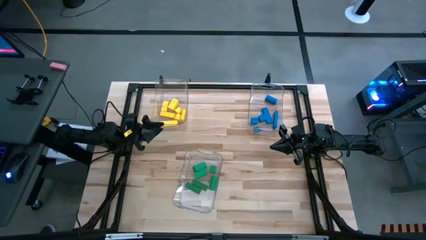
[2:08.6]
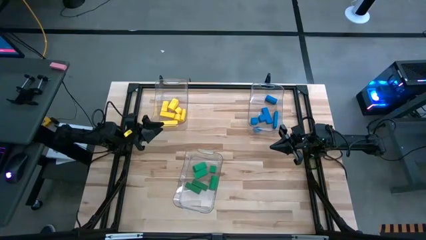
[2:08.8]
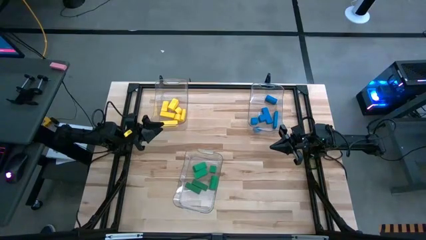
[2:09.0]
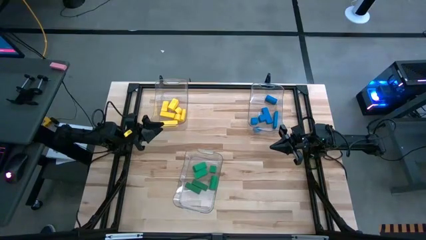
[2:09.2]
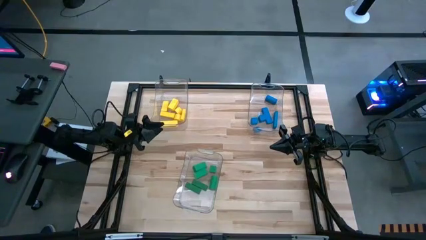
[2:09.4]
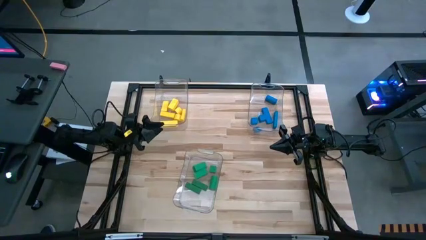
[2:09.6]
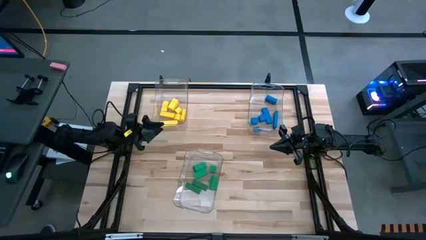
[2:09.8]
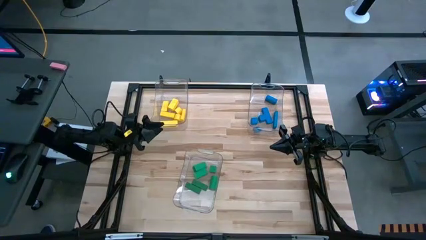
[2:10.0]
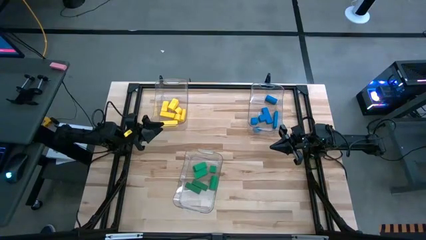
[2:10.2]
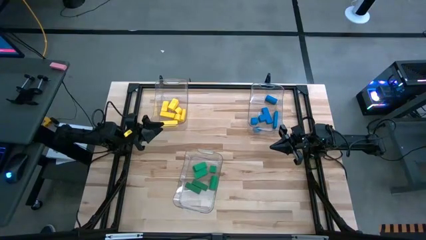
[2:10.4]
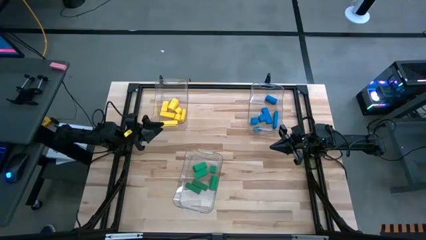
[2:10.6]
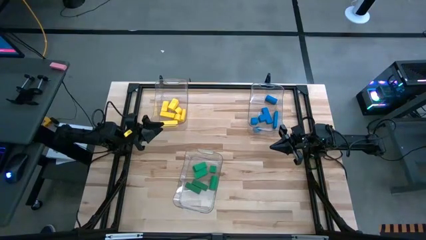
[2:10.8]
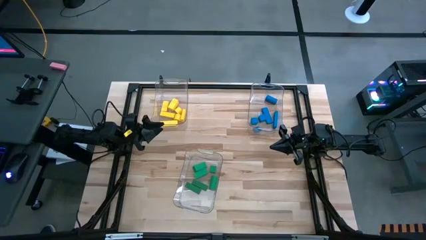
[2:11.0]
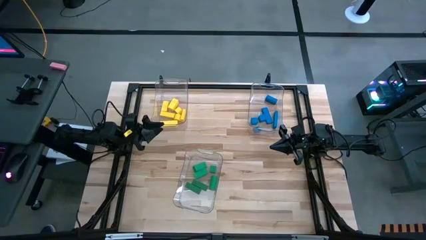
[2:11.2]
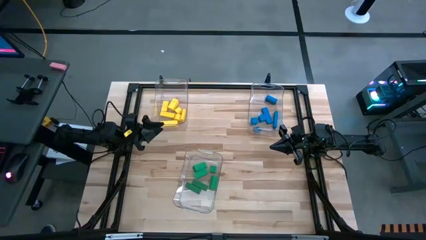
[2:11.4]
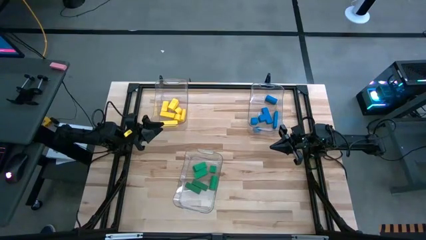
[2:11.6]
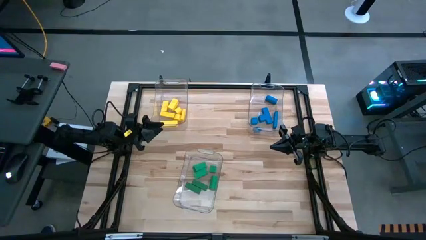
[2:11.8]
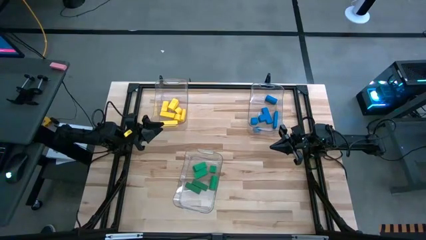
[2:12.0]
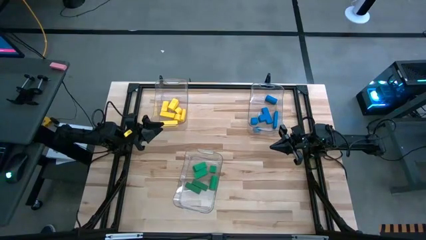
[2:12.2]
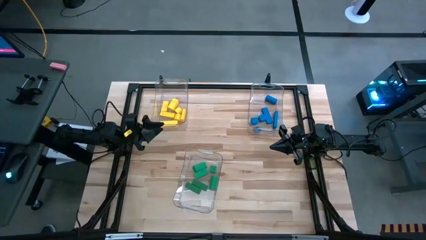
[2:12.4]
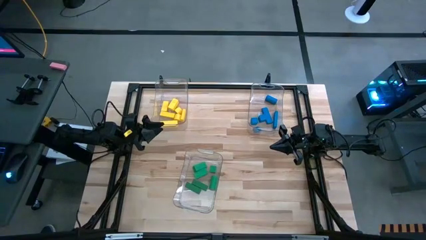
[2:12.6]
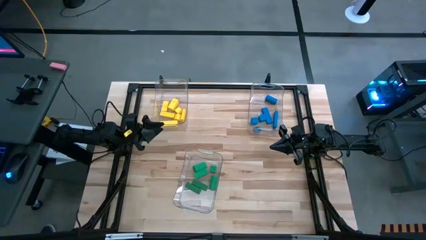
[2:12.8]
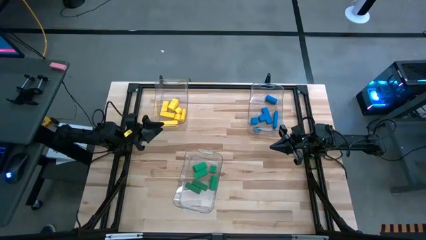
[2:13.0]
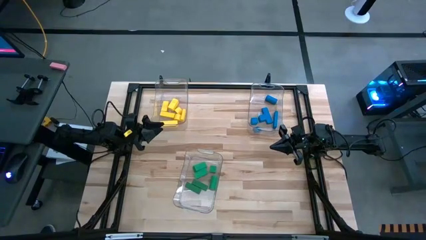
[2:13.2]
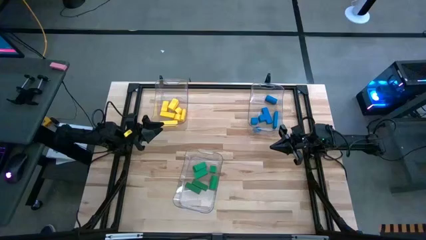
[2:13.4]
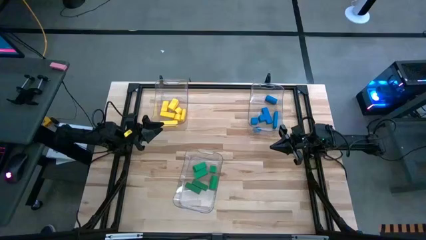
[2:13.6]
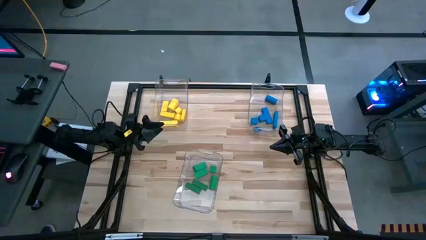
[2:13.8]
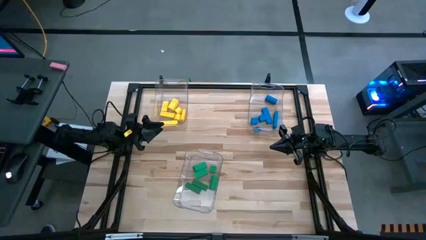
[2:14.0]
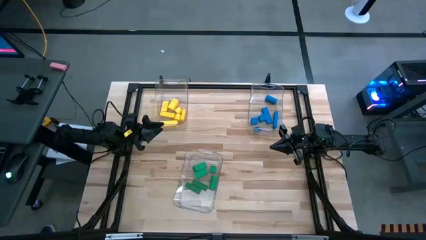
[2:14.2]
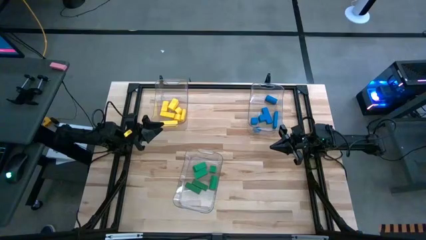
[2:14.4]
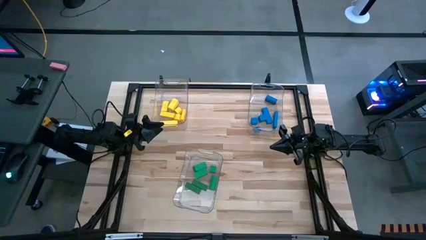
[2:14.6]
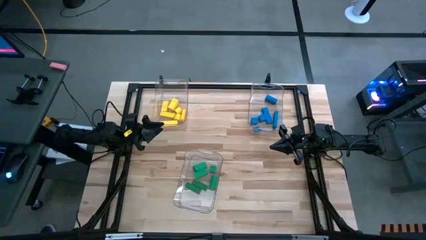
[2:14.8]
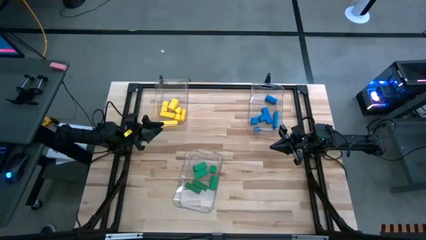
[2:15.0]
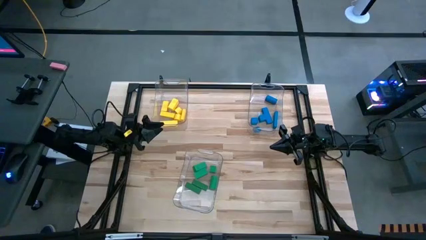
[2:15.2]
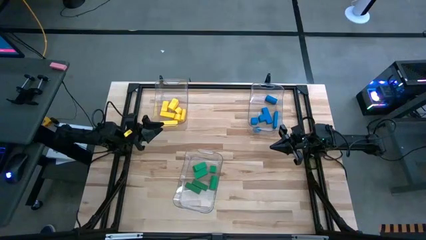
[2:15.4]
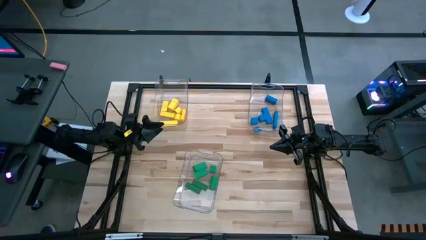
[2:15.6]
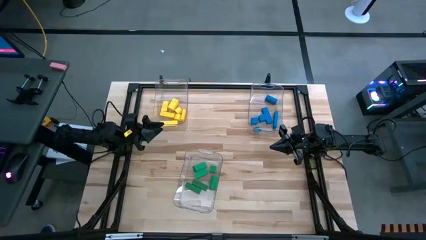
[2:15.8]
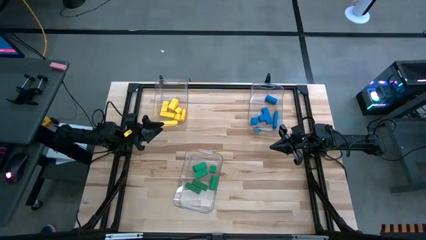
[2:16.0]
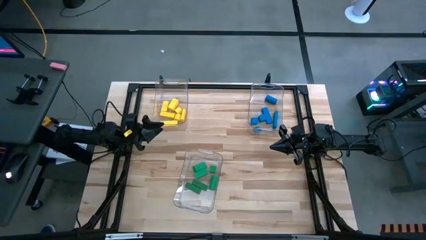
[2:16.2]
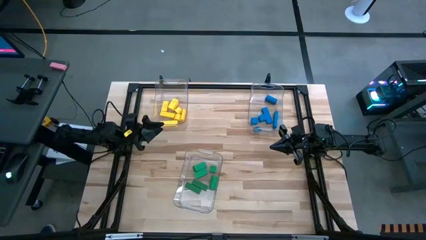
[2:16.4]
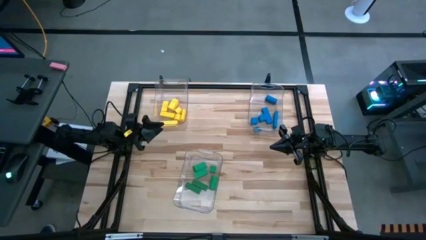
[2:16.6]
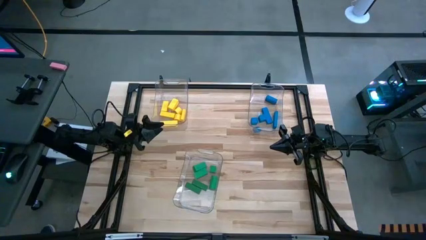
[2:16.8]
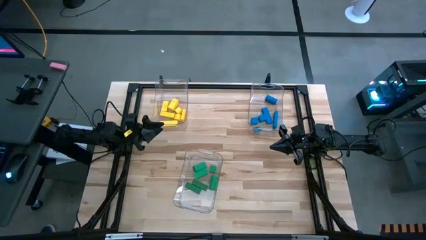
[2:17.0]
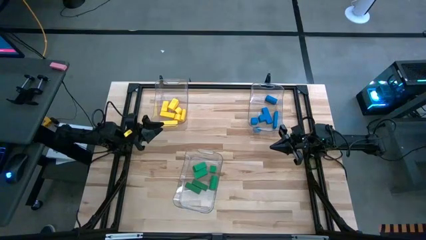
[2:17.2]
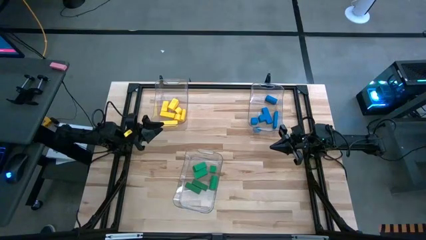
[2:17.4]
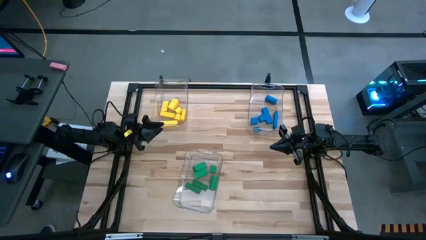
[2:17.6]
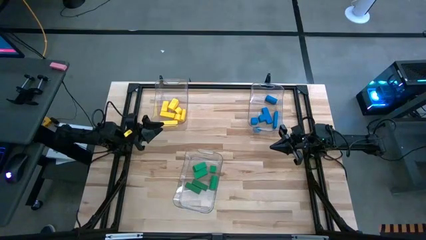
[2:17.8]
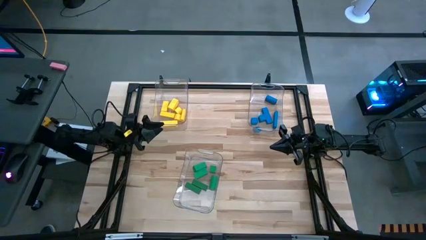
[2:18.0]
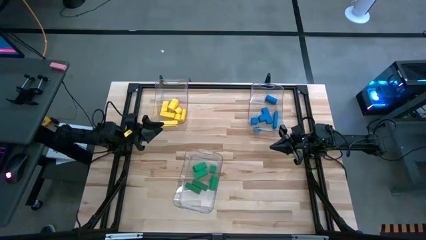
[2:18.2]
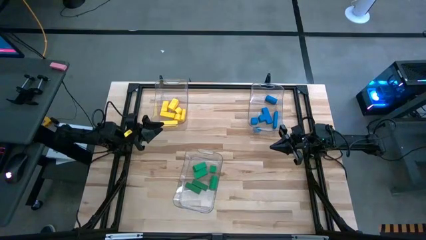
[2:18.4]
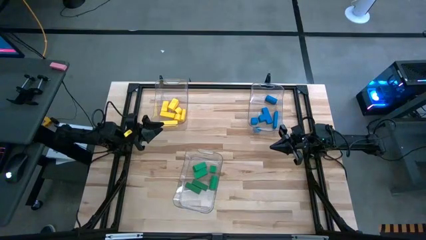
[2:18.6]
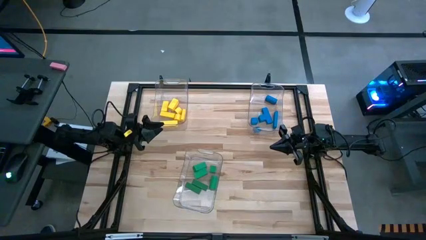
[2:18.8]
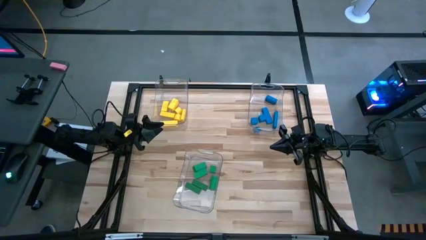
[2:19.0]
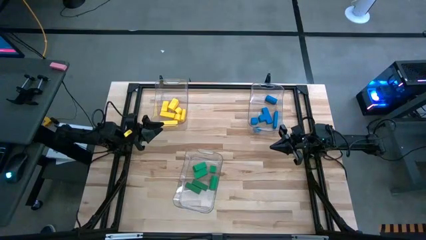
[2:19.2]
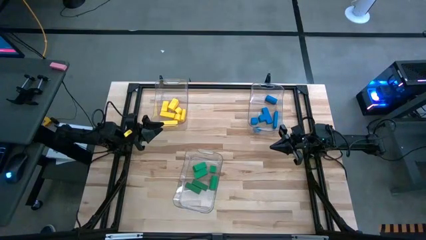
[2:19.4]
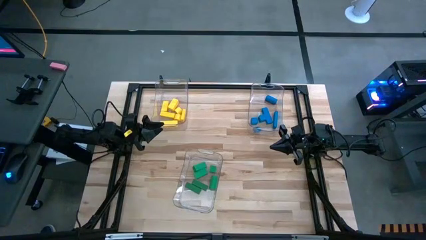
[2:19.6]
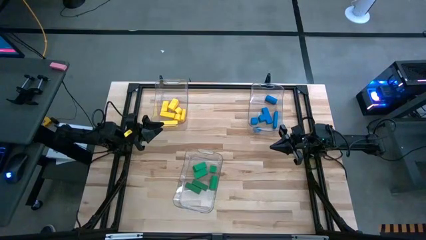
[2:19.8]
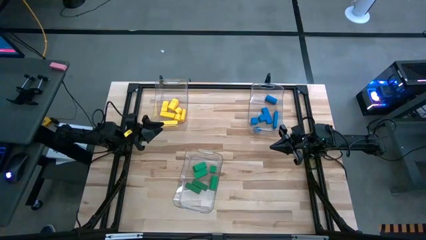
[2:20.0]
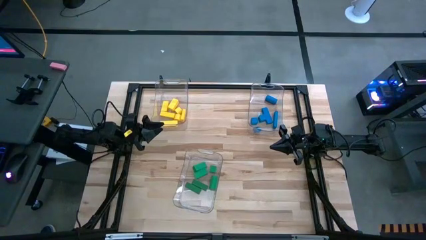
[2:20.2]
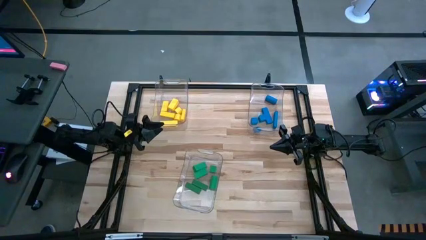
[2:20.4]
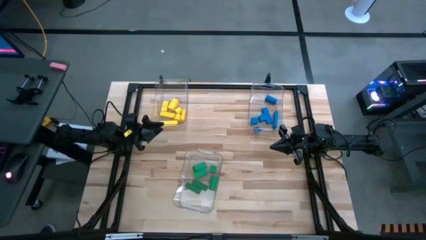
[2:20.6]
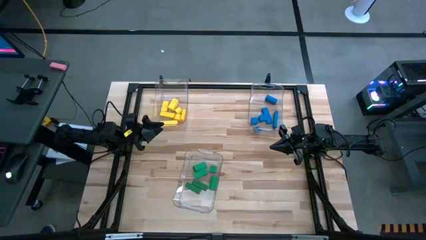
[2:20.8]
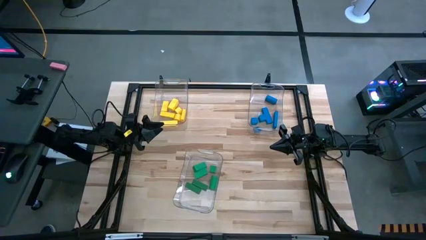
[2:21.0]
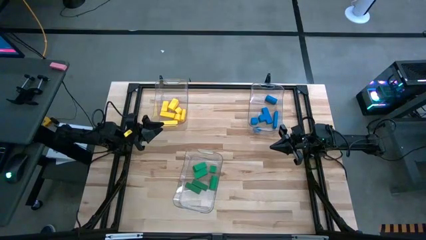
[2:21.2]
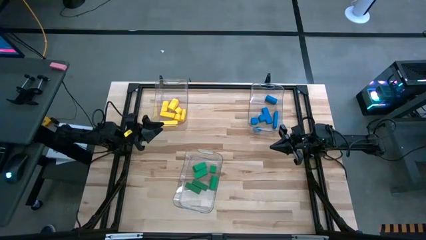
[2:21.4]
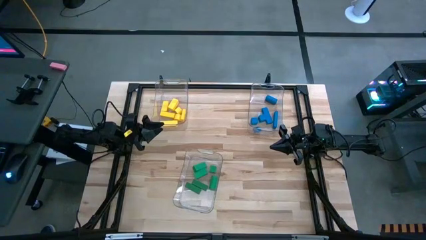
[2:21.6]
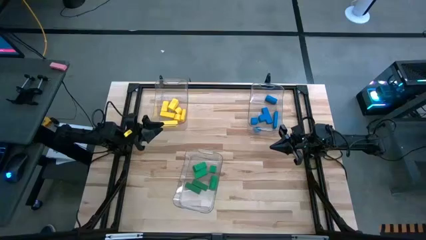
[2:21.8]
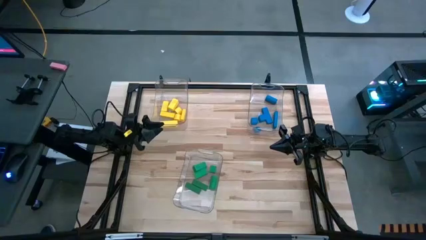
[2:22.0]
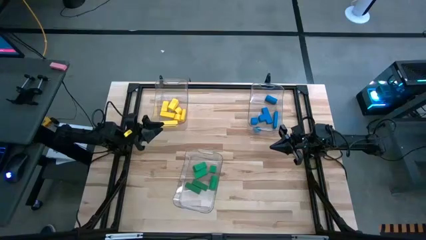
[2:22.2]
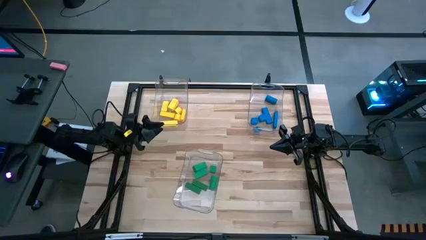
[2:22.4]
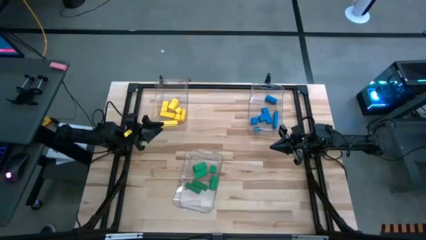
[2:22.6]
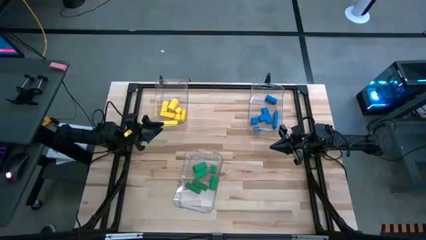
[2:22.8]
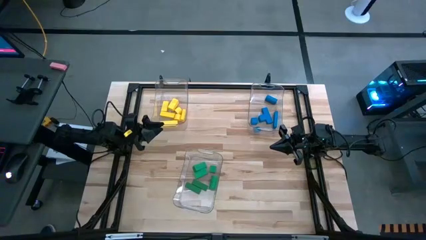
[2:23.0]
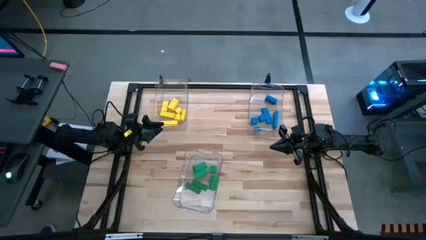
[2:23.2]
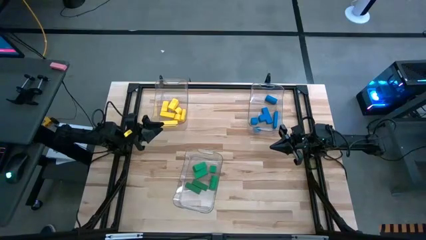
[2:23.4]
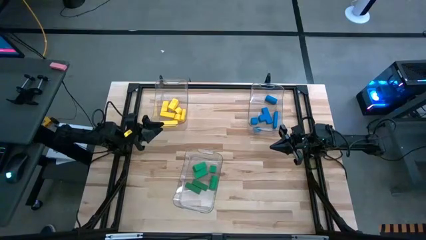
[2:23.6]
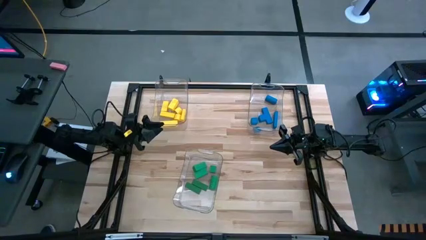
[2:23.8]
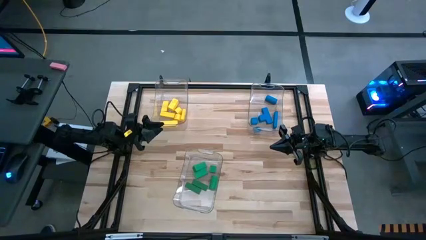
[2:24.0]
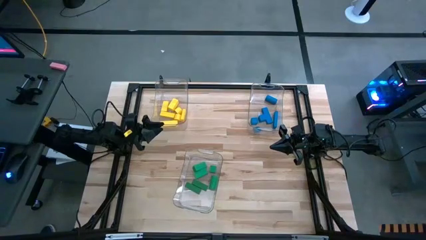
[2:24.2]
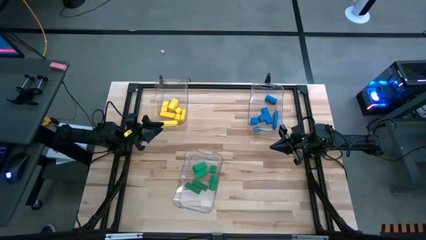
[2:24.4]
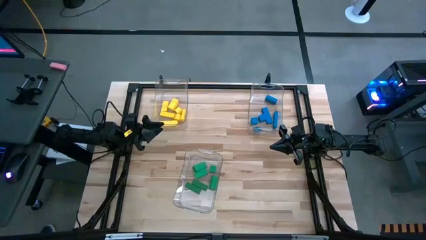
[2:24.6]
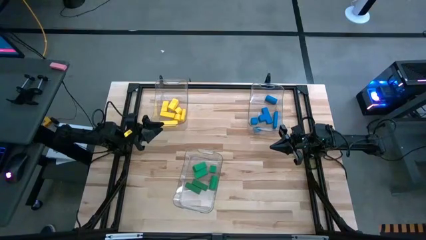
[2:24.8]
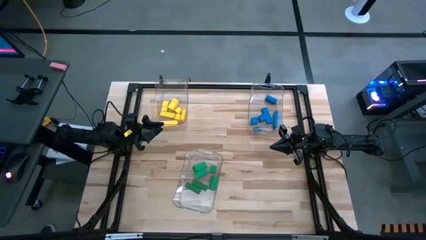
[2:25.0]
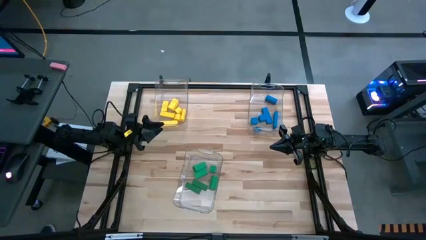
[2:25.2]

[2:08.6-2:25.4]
Task: Sort blocks
Return to Home Position
